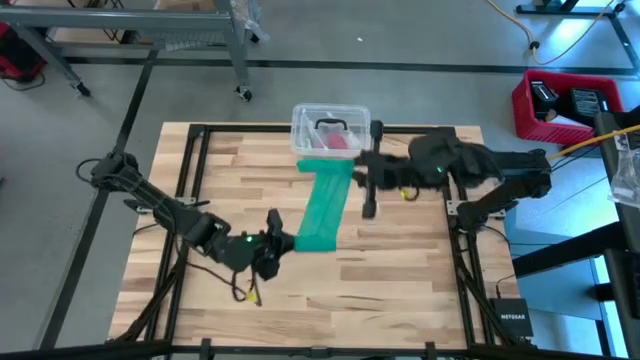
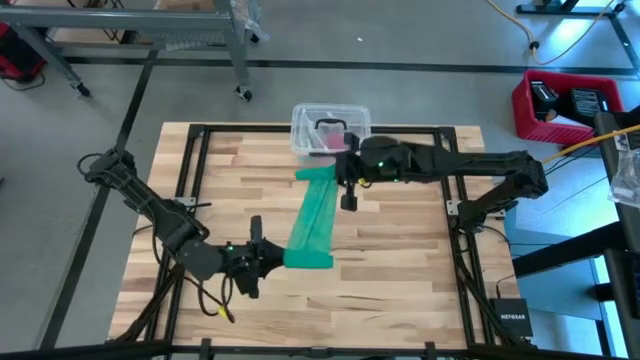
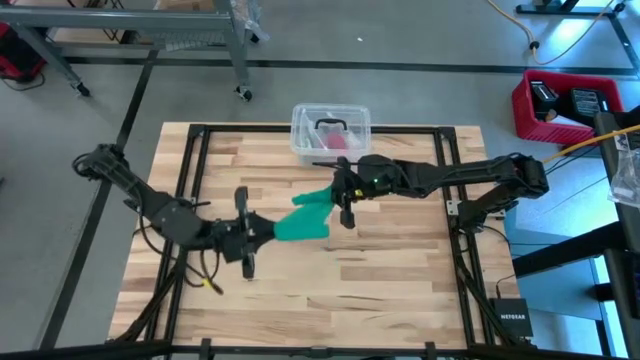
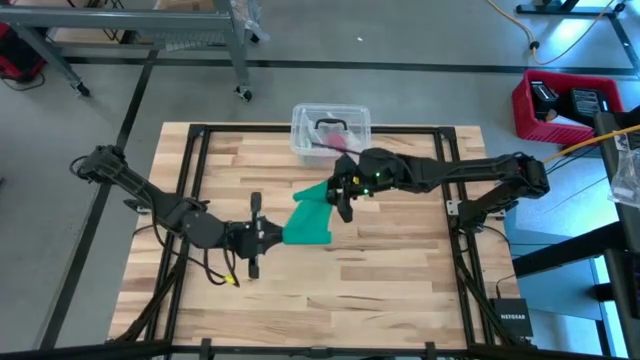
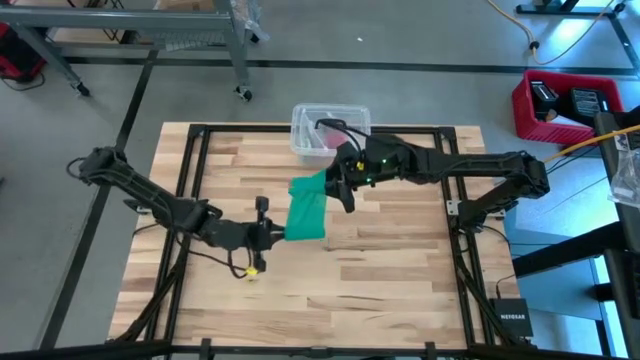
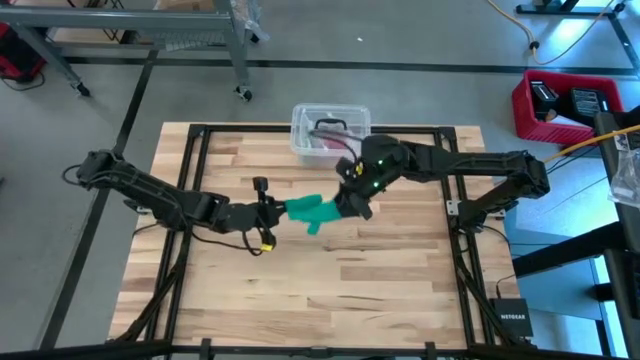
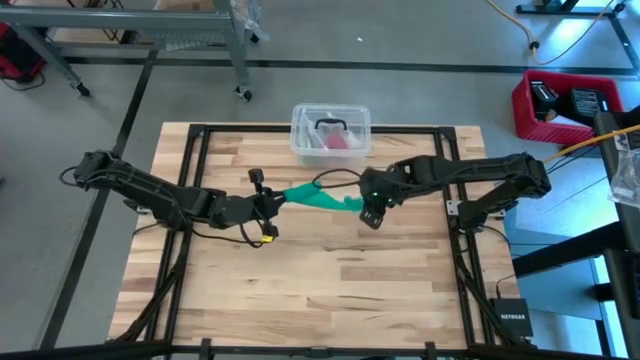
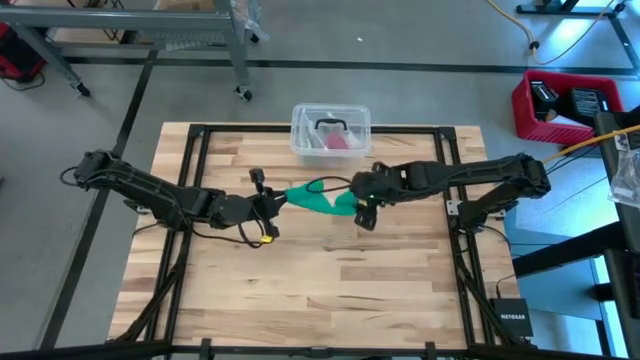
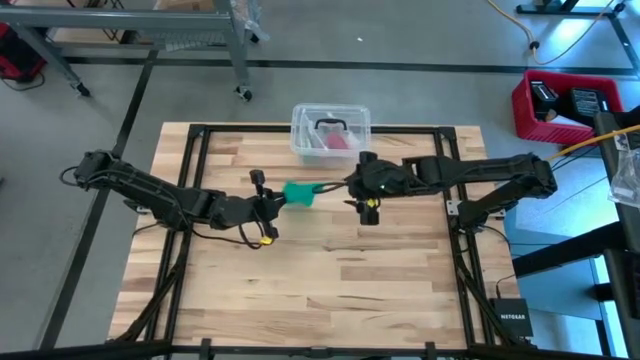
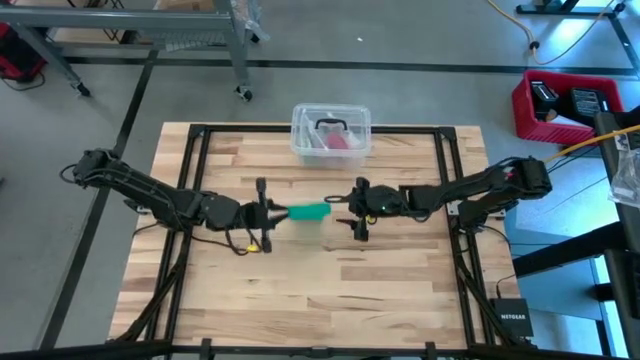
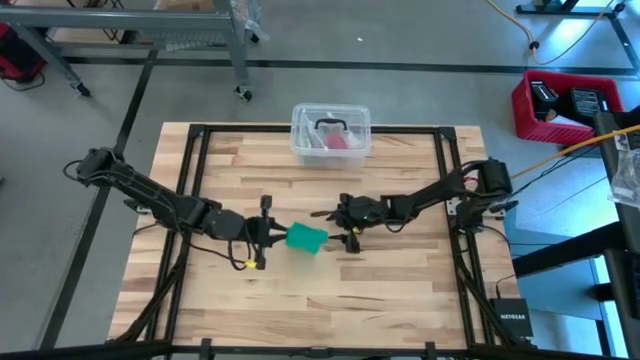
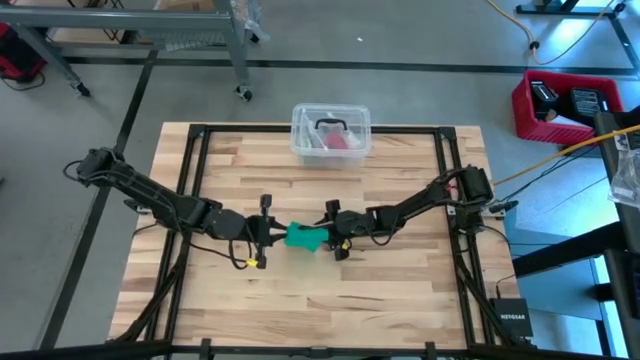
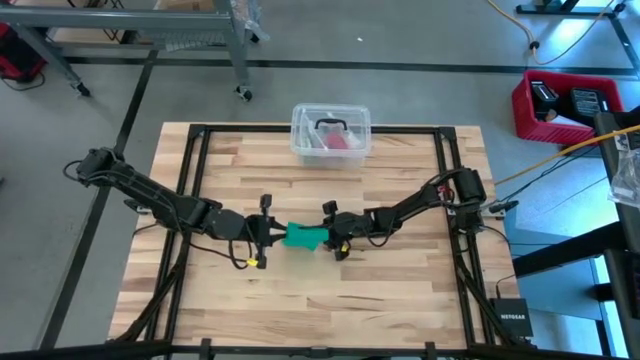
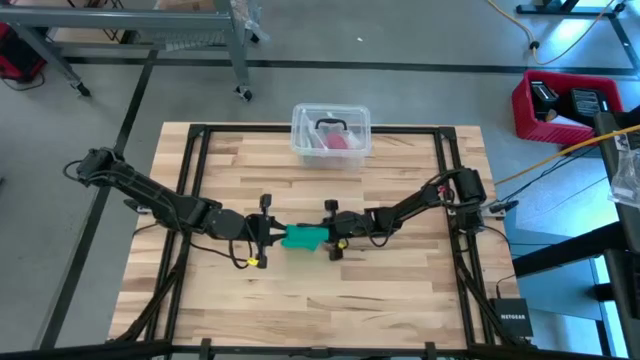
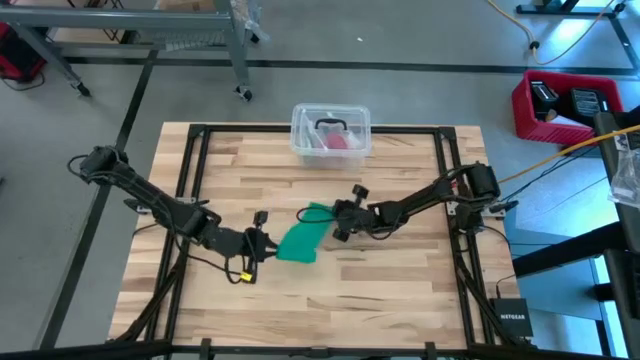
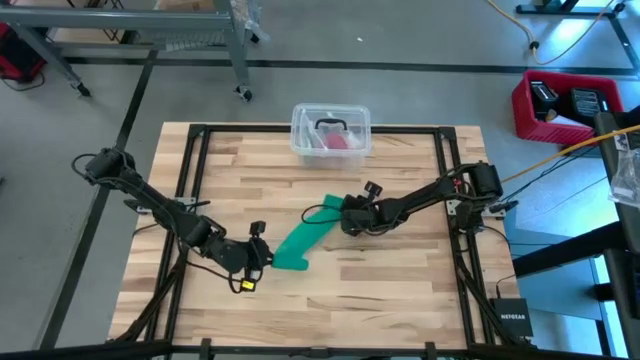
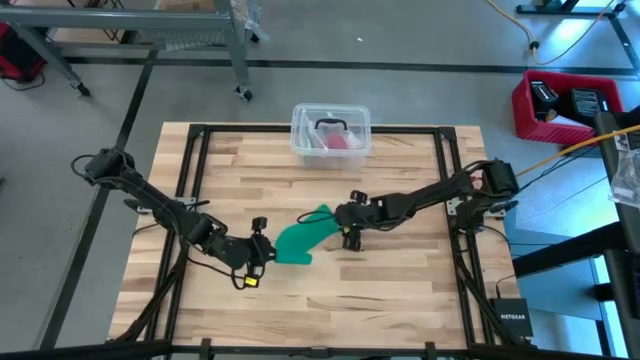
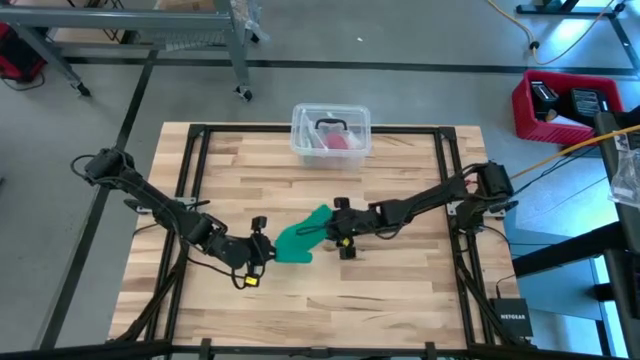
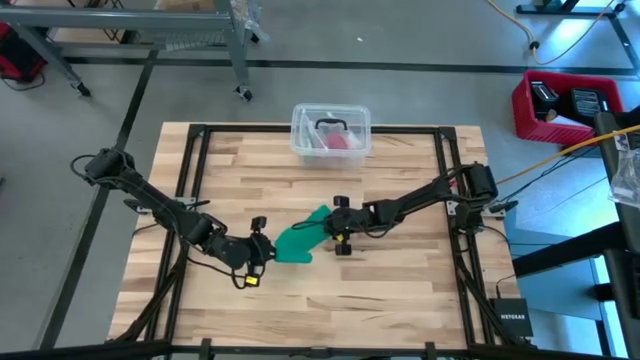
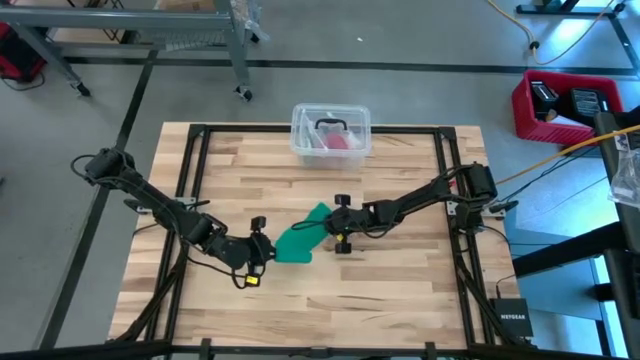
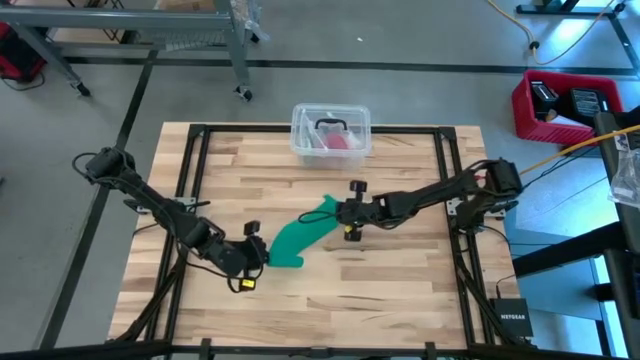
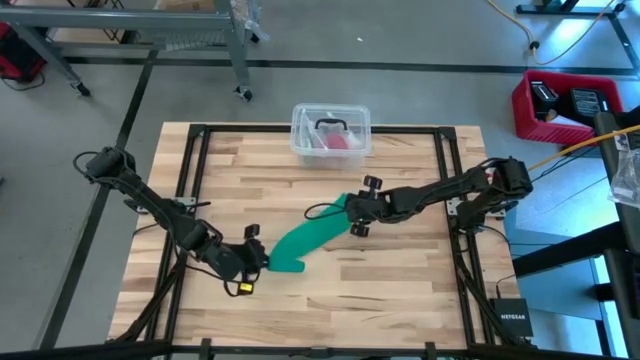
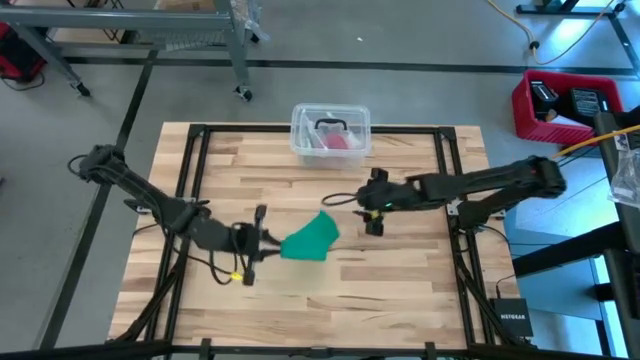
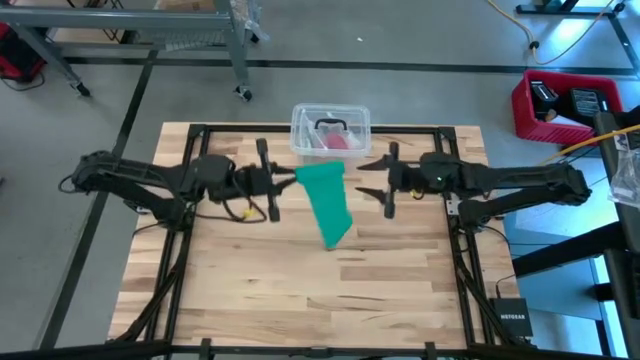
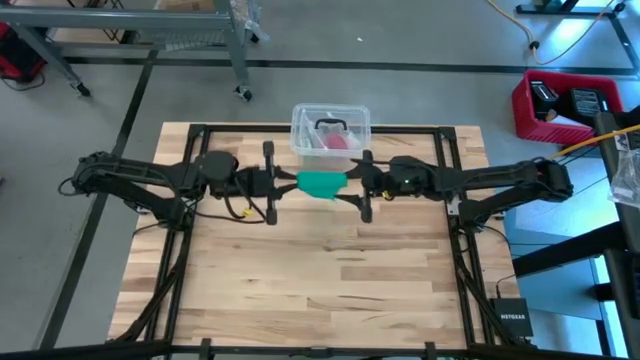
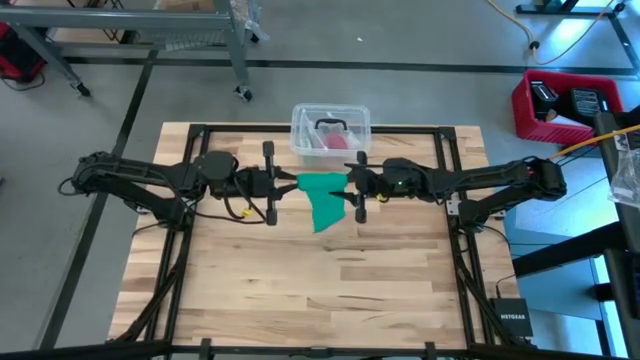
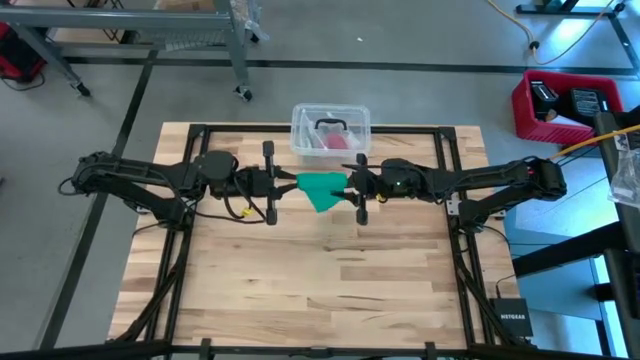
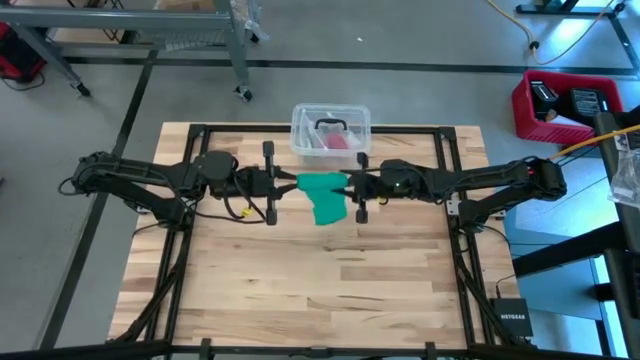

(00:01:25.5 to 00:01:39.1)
Task: Roll bandage
Roll the green bandage

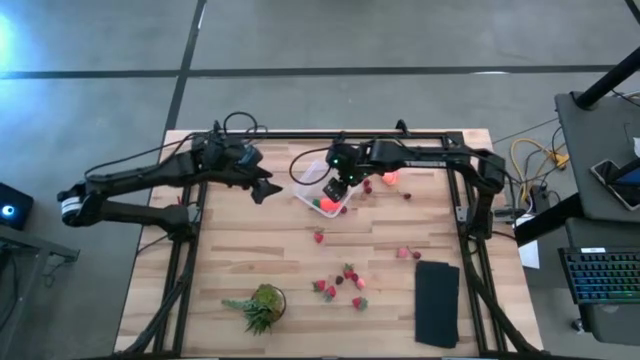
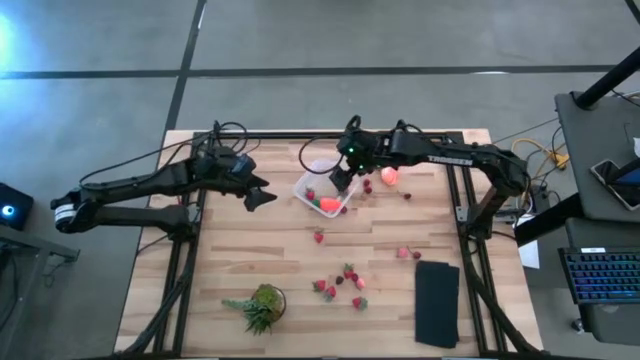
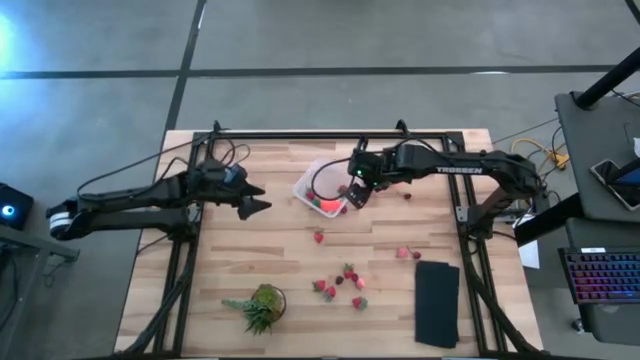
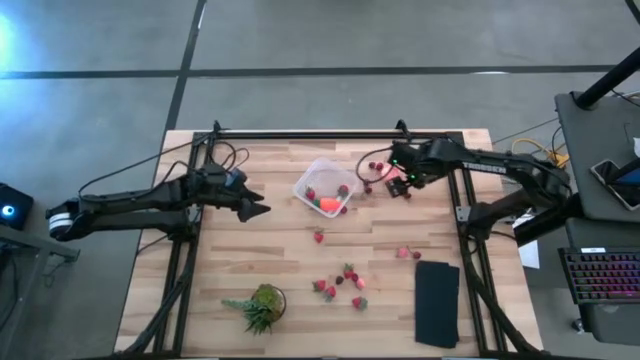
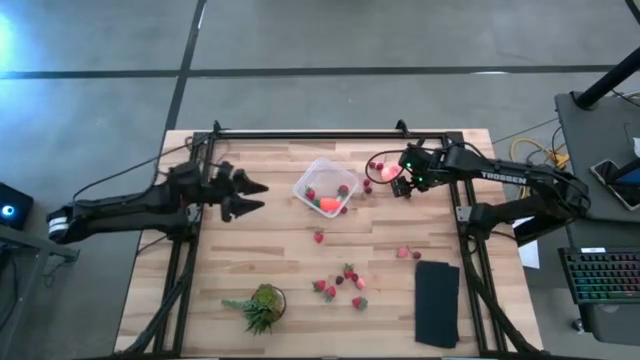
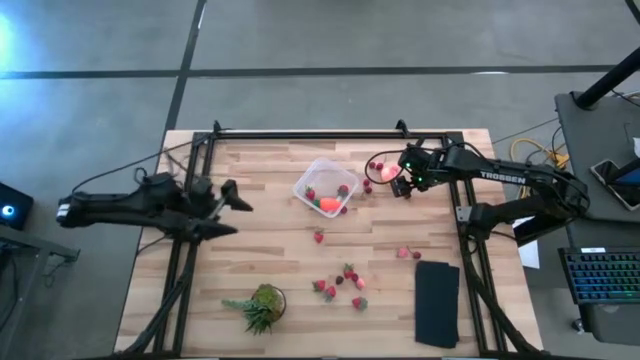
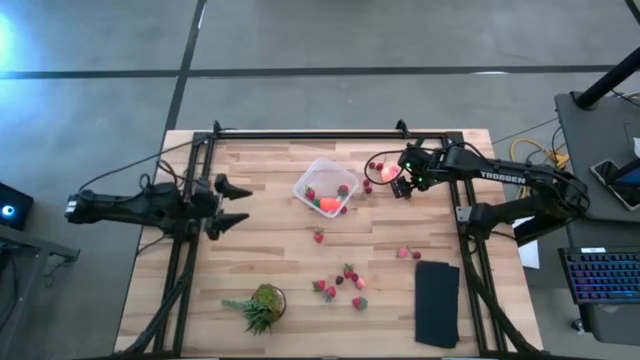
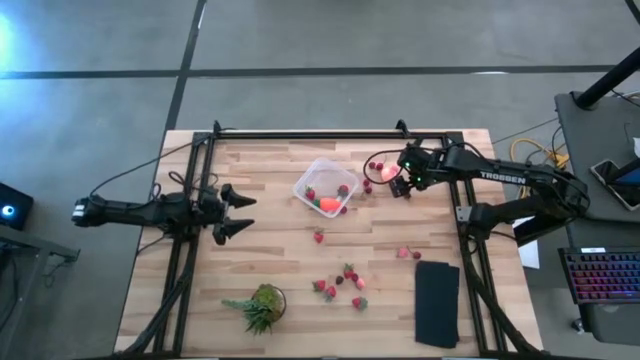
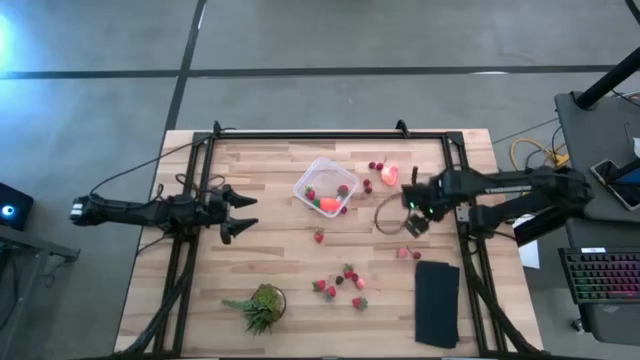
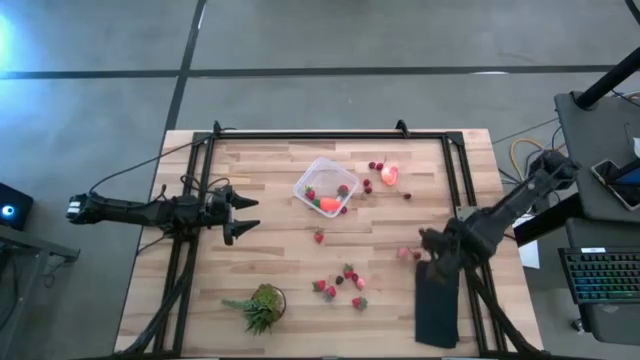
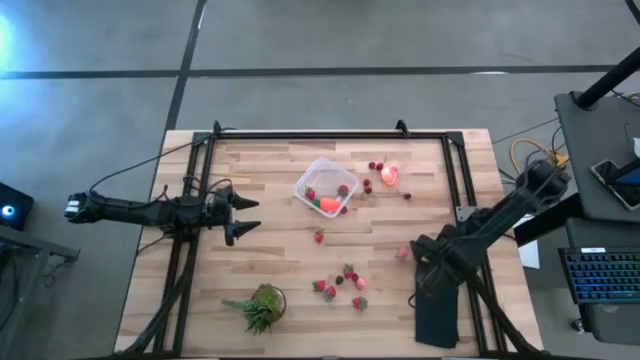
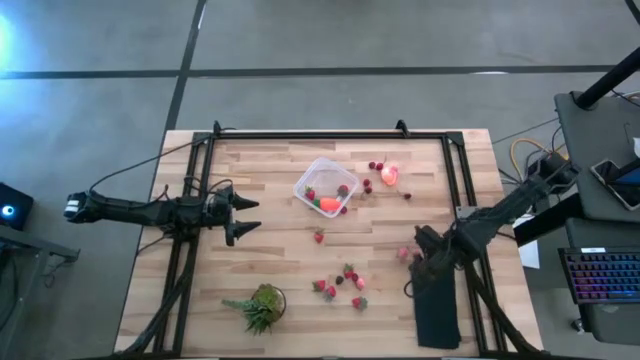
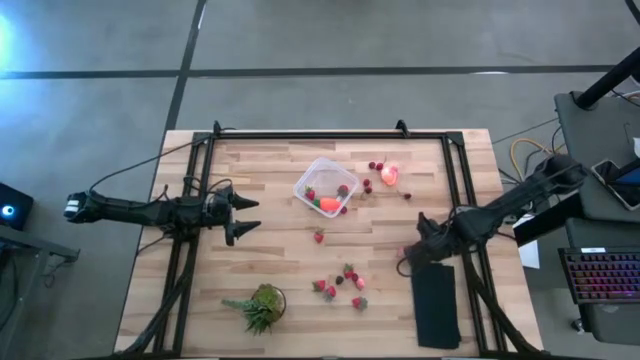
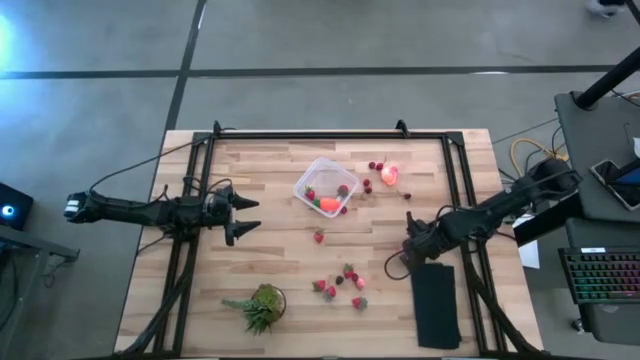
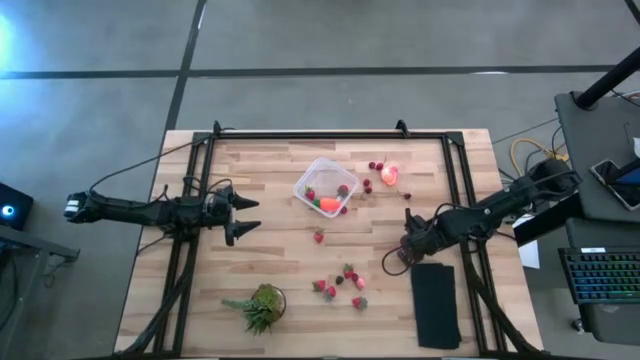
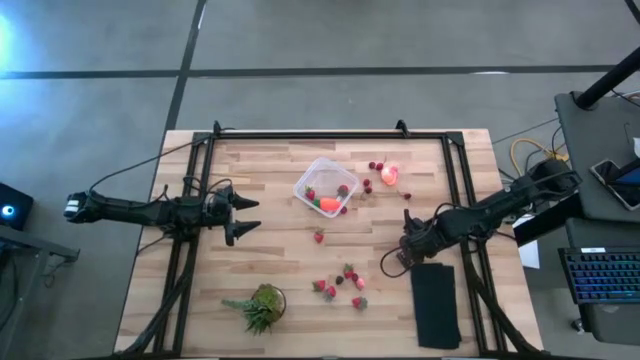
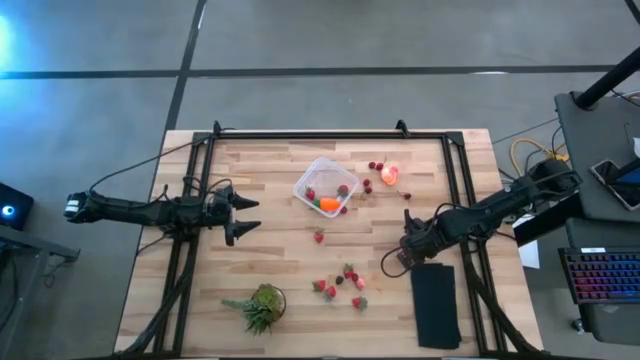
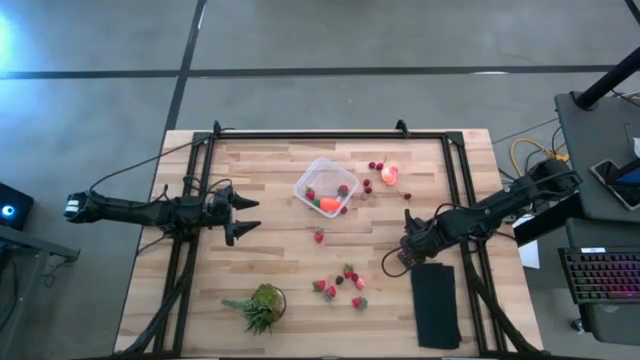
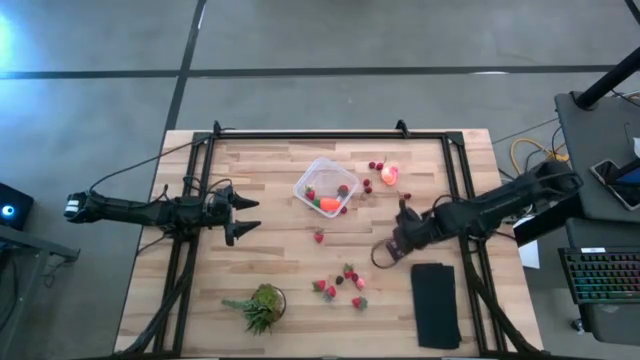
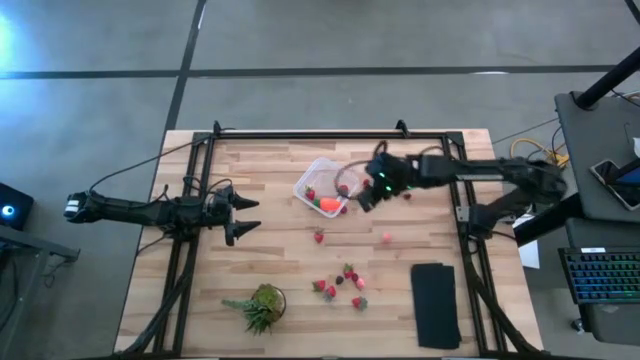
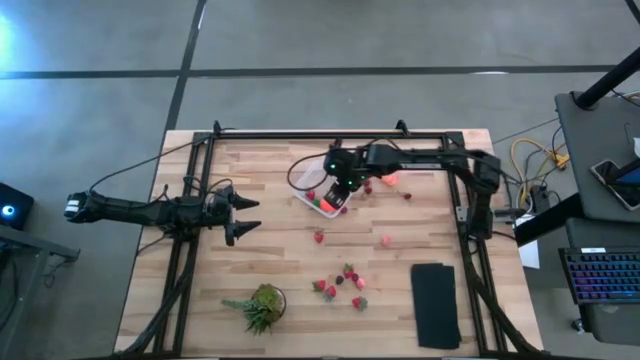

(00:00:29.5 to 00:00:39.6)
Task: Pick and placing Produce into tupperware
Put the red cherry into the transparent bin
